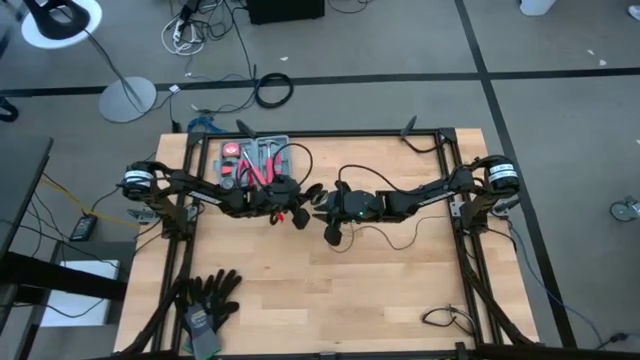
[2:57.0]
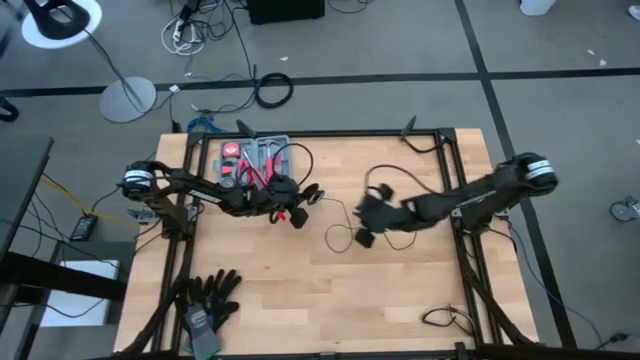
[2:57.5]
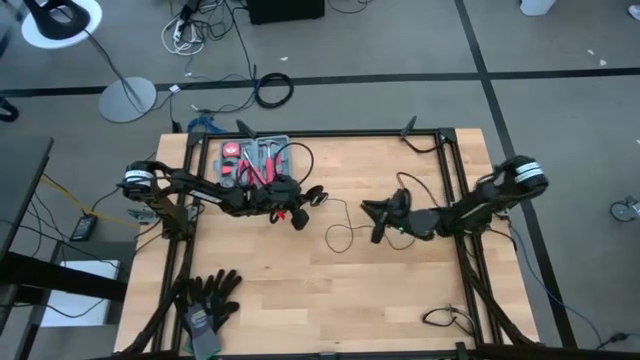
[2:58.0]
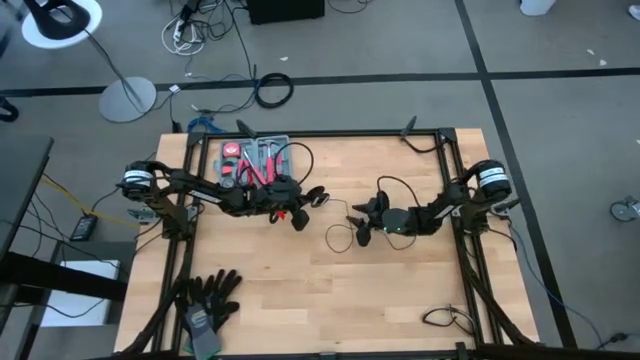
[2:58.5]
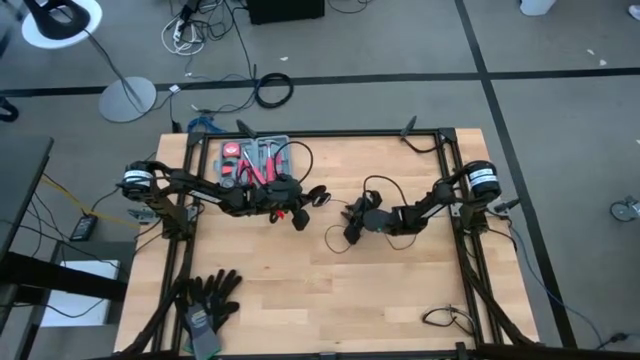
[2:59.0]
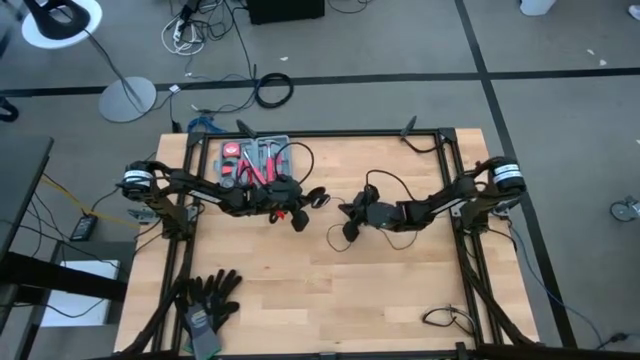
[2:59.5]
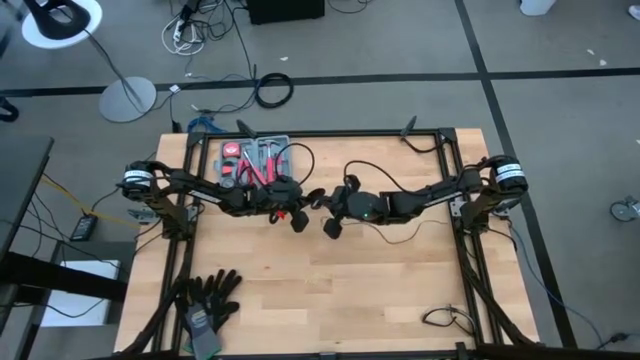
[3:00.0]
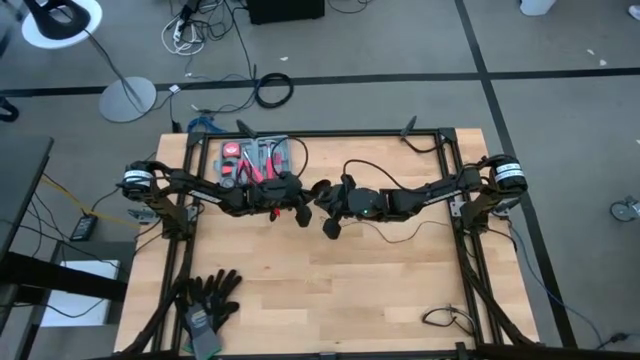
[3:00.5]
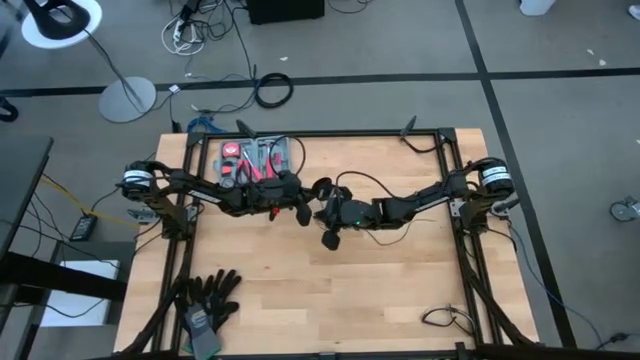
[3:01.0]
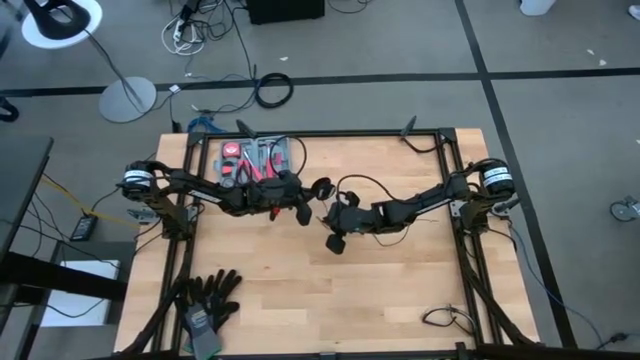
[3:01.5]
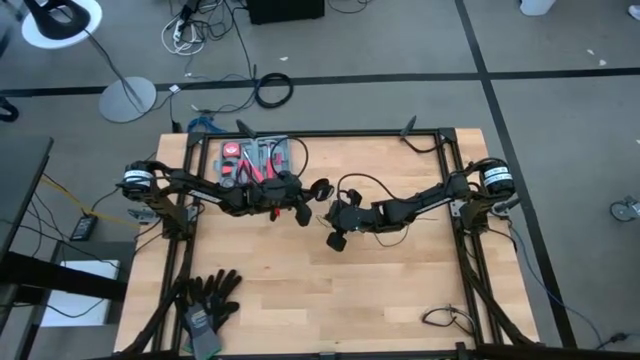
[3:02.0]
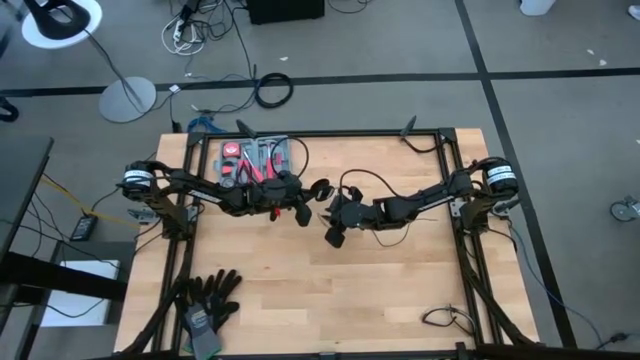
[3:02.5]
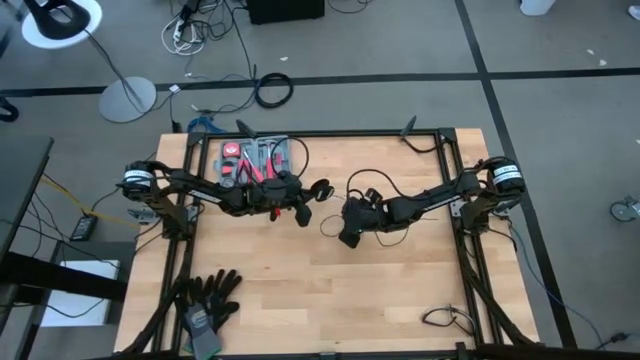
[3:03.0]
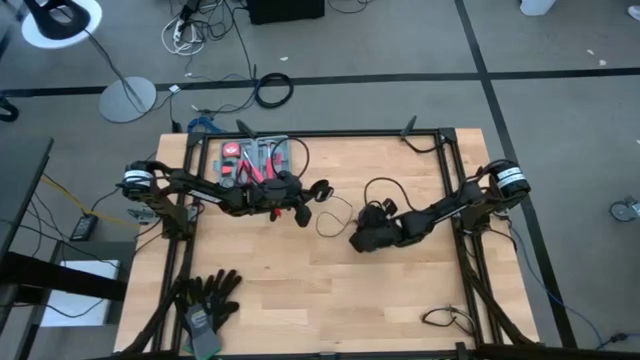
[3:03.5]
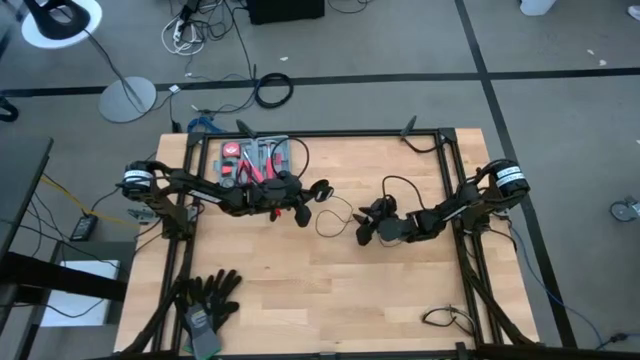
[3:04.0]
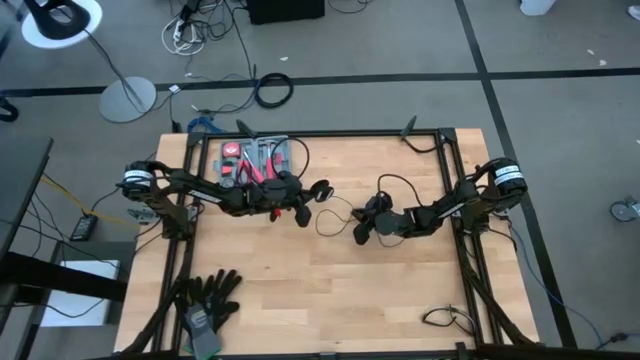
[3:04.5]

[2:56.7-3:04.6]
Task: Coil cords
Coil the black cable wire on the spool

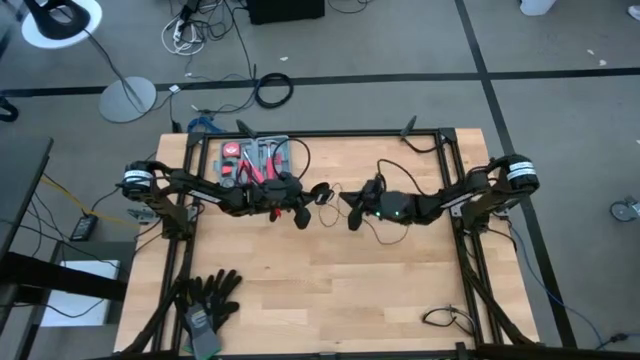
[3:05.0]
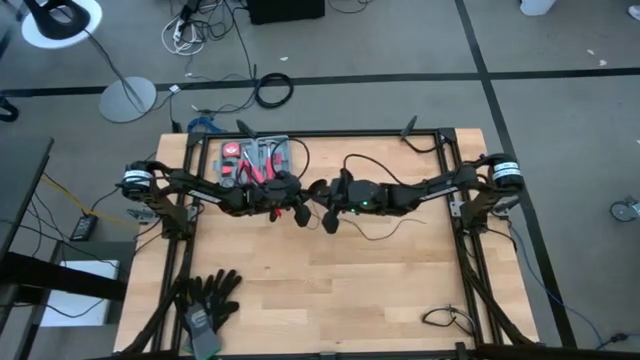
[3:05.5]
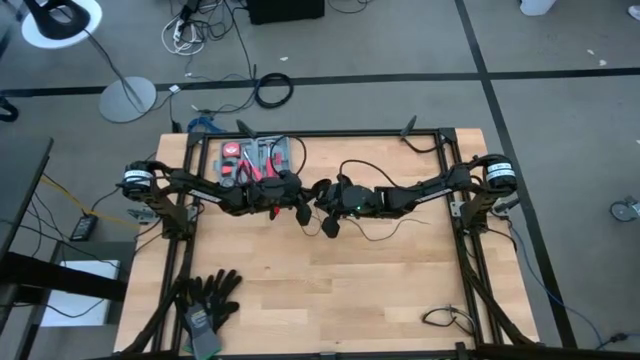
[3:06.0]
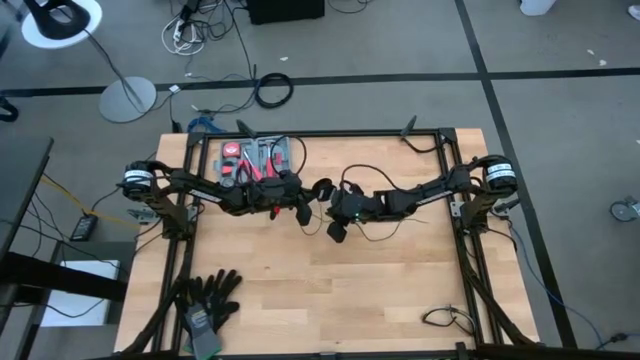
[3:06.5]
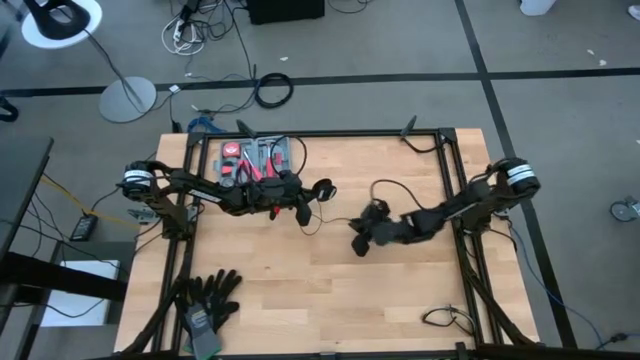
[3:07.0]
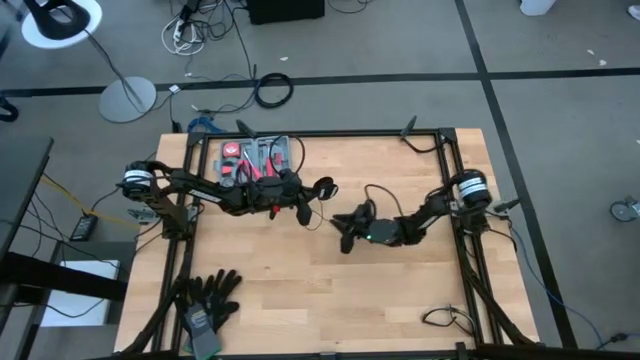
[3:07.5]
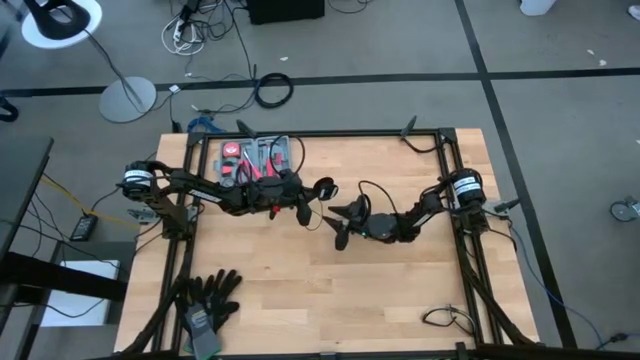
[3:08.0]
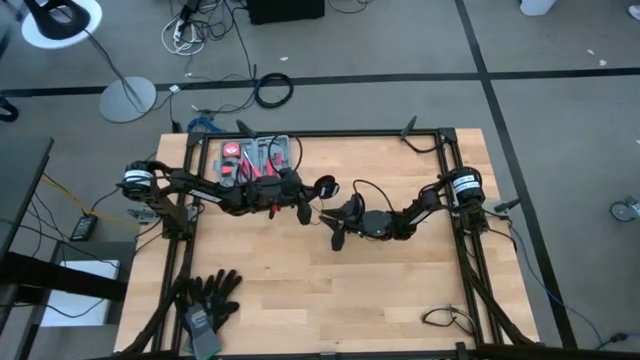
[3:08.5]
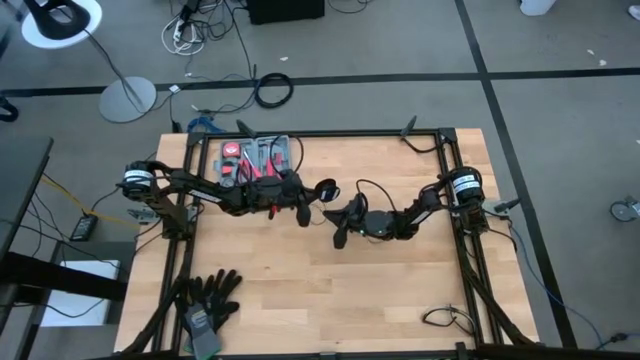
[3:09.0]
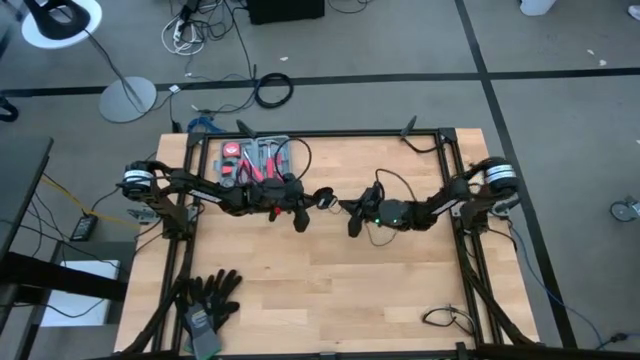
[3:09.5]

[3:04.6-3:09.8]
Coil the black cable wire on the spool

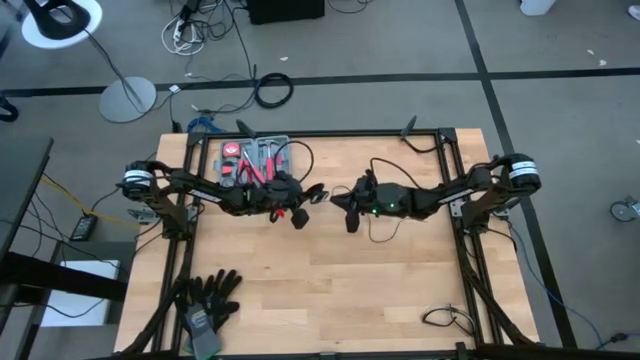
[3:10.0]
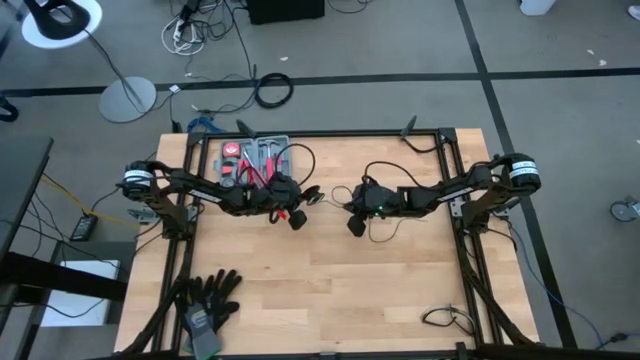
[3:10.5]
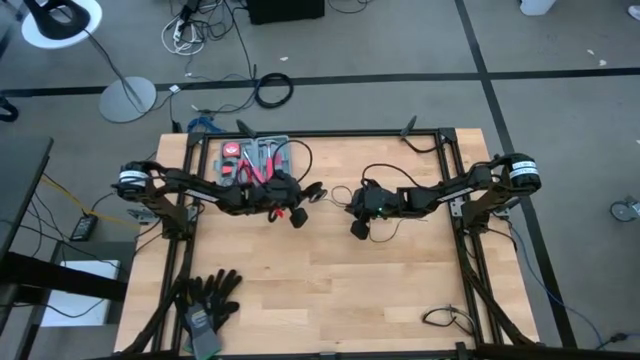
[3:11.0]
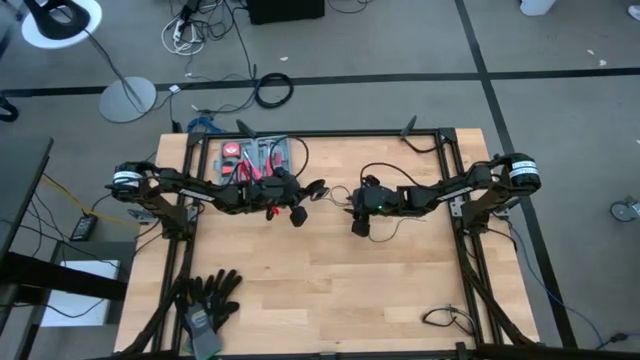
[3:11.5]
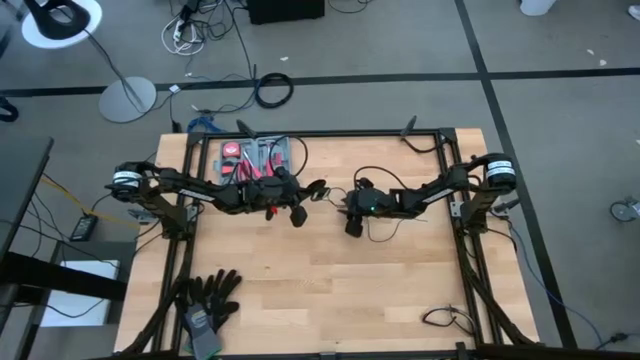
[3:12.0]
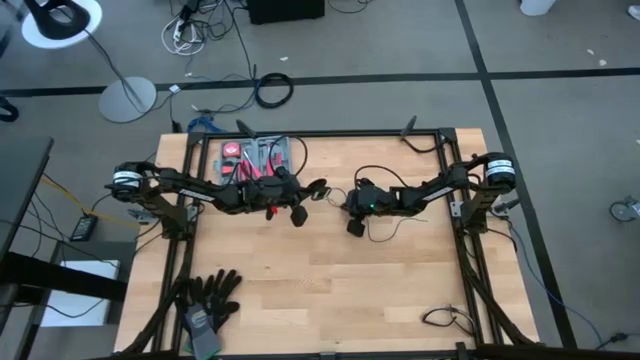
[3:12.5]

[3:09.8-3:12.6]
Coil the black cable wire on the spool

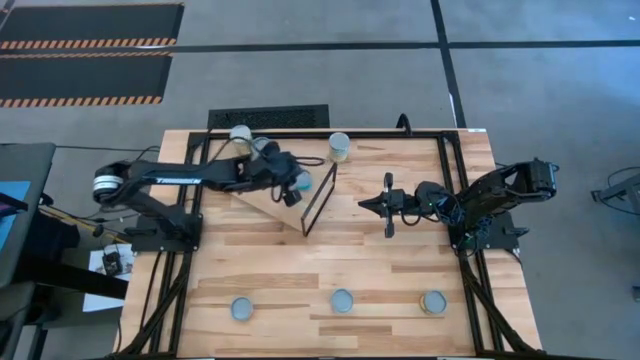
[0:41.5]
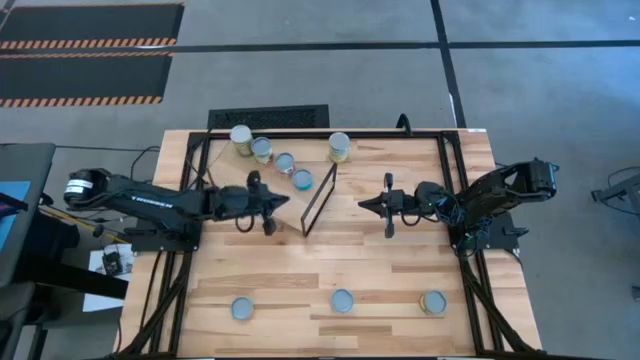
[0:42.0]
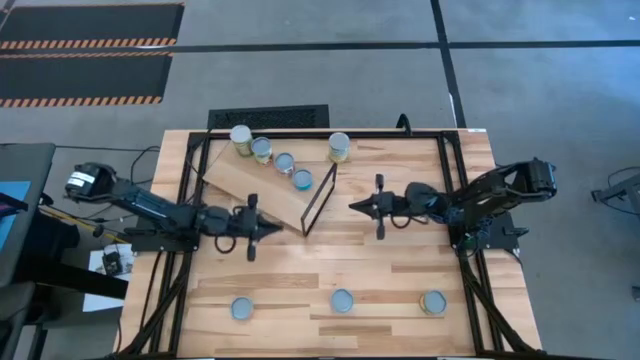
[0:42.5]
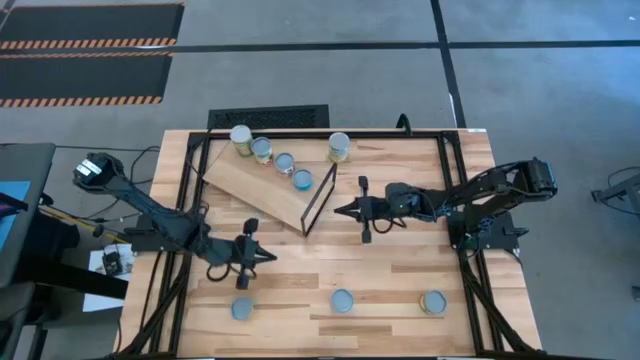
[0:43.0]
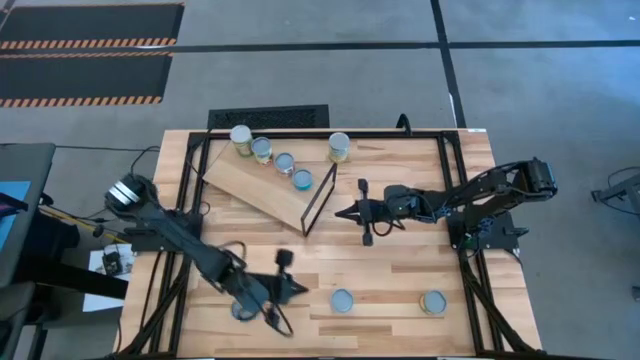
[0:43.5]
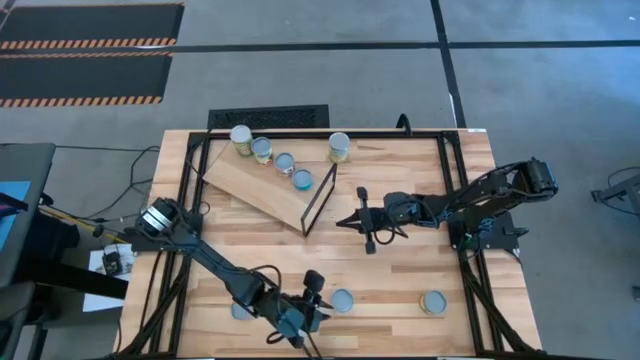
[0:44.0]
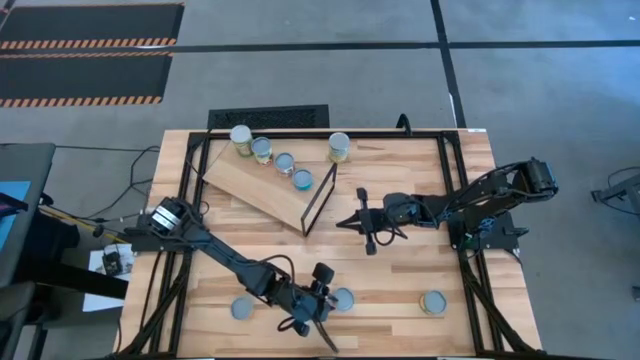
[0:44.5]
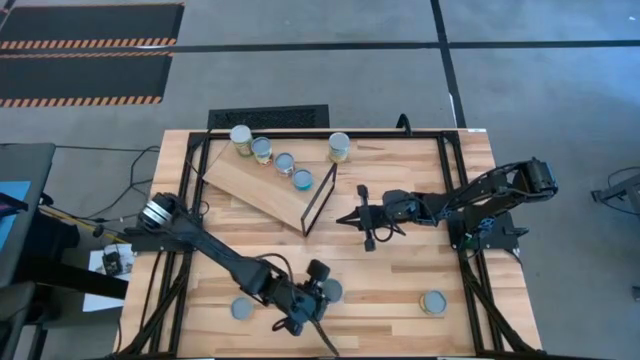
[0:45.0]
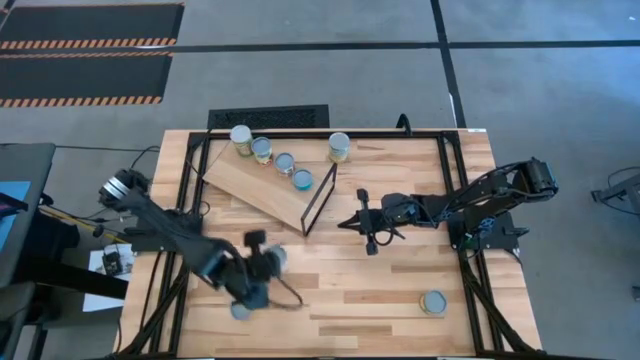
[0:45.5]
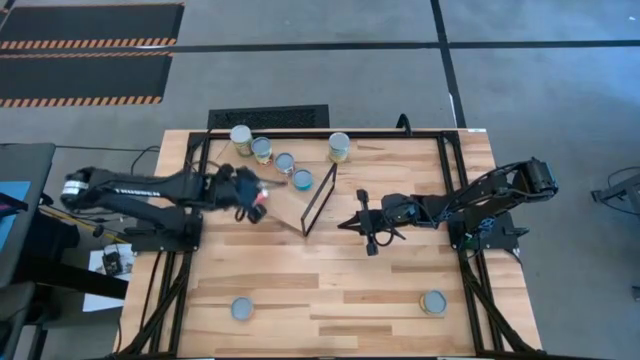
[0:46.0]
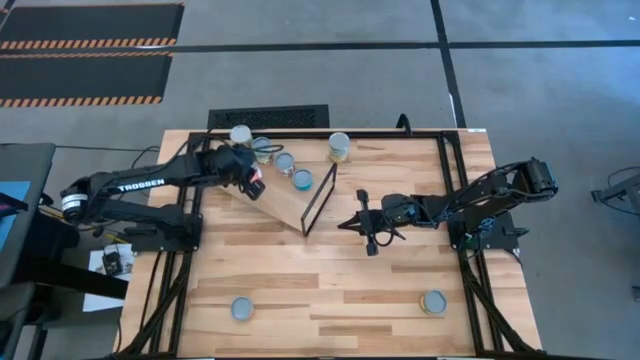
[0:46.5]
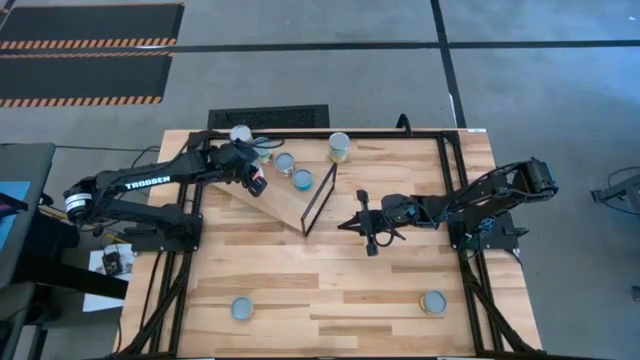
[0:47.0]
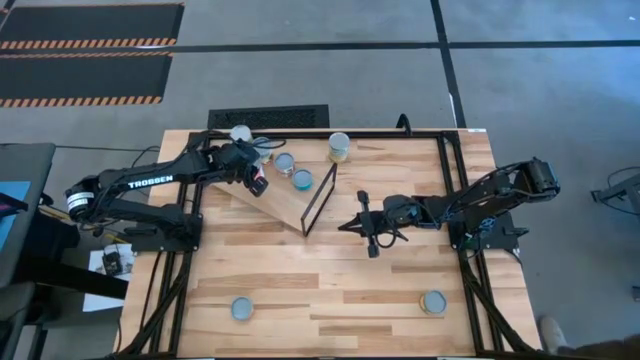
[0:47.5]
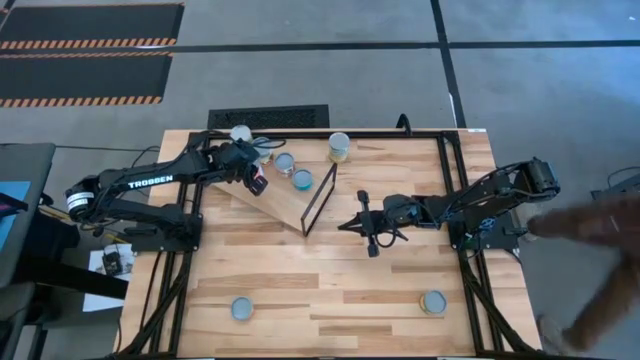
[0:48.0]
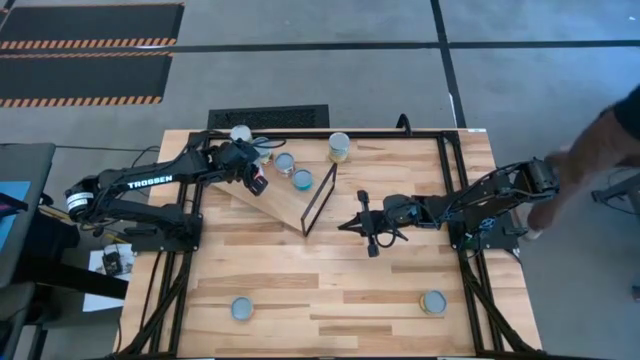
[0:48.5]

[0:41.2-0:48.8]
Task: Pick and place cans onto a shelf
Put the canned pineapples on the shelf
